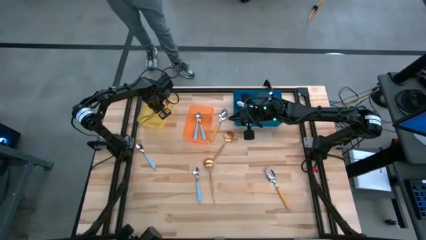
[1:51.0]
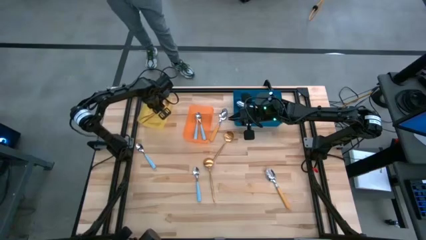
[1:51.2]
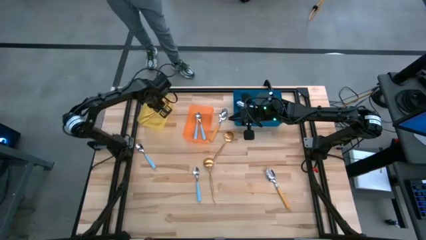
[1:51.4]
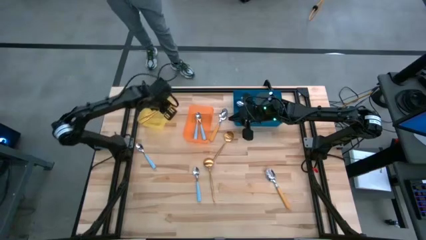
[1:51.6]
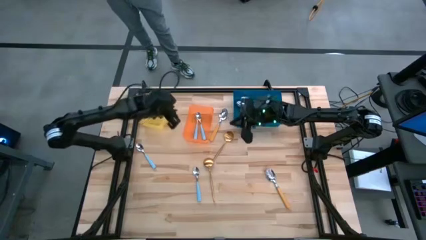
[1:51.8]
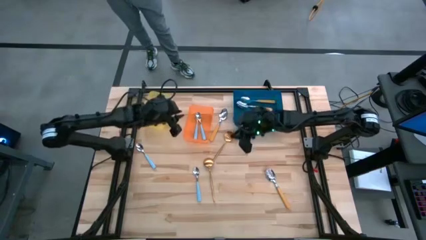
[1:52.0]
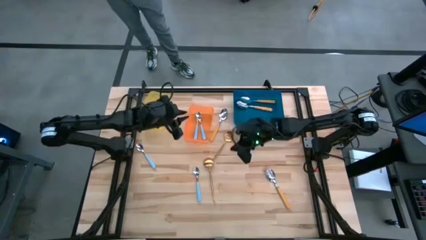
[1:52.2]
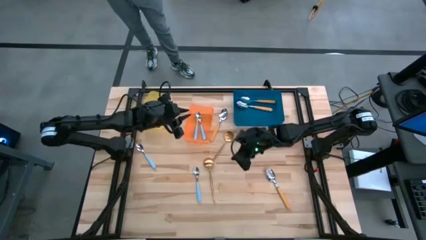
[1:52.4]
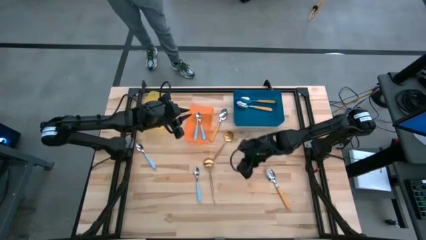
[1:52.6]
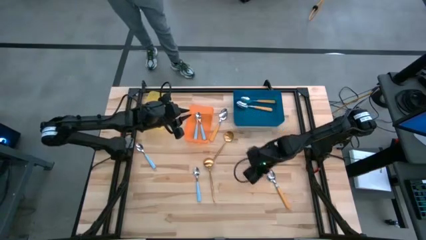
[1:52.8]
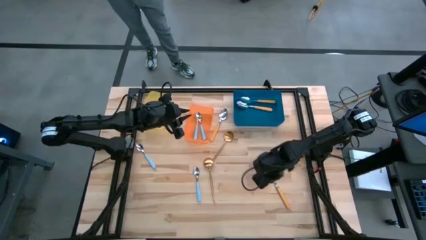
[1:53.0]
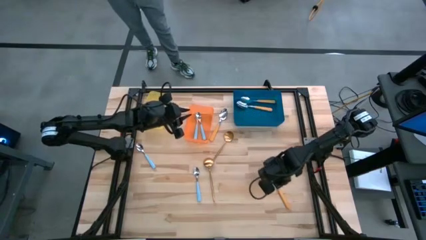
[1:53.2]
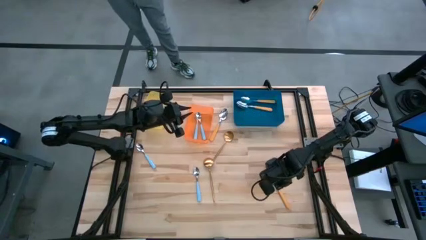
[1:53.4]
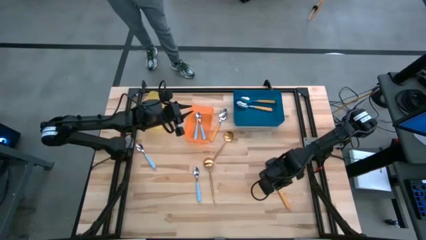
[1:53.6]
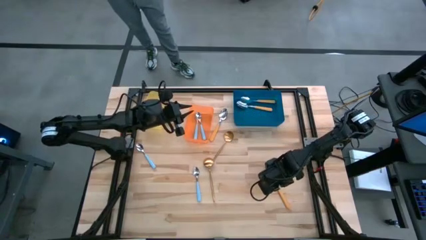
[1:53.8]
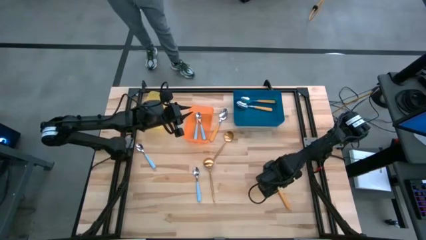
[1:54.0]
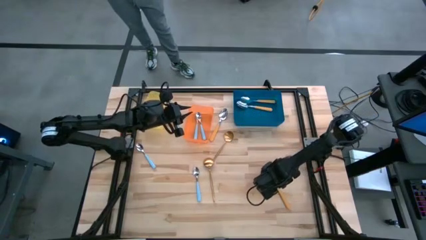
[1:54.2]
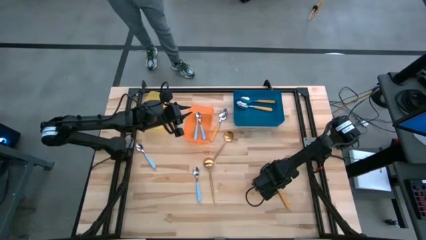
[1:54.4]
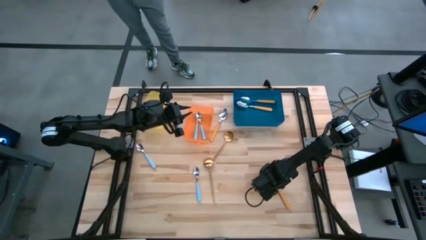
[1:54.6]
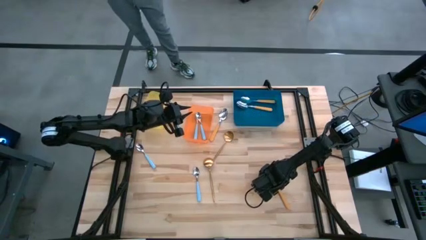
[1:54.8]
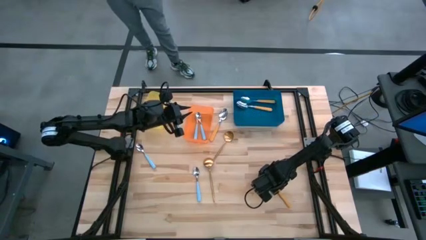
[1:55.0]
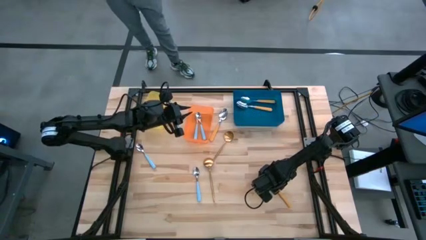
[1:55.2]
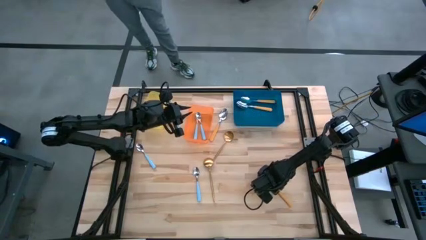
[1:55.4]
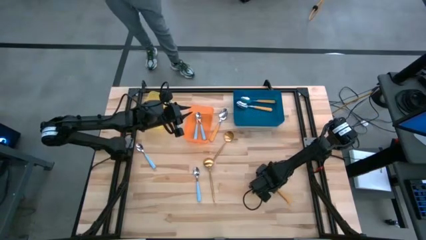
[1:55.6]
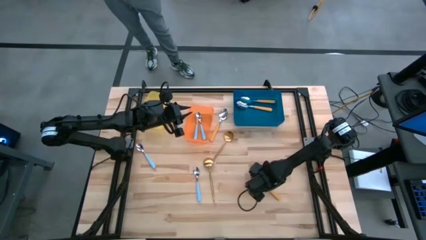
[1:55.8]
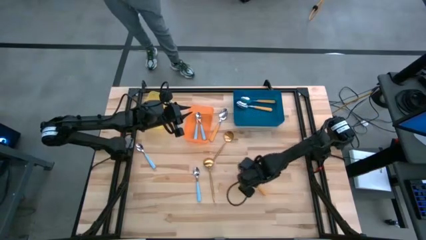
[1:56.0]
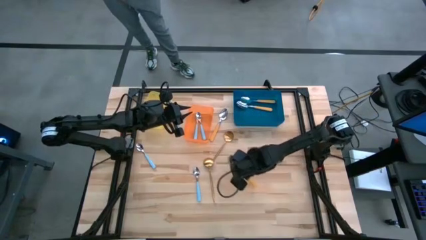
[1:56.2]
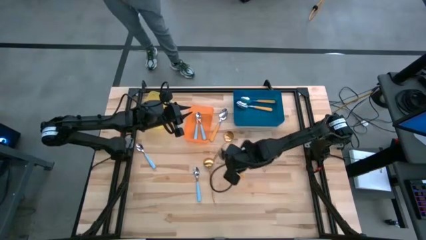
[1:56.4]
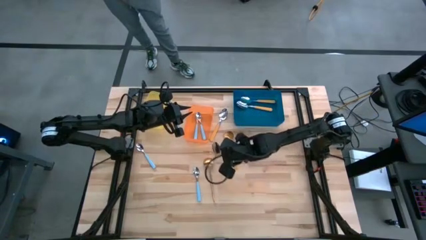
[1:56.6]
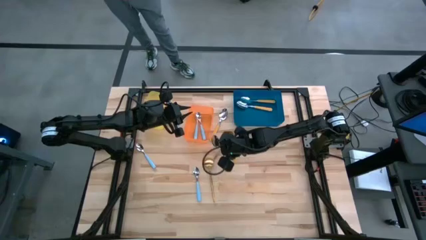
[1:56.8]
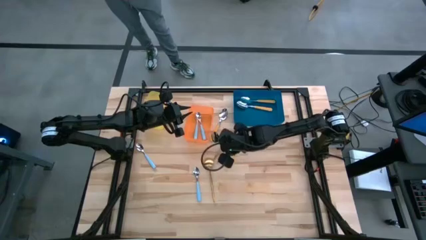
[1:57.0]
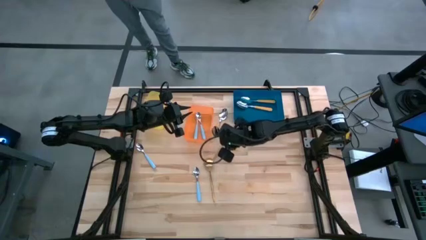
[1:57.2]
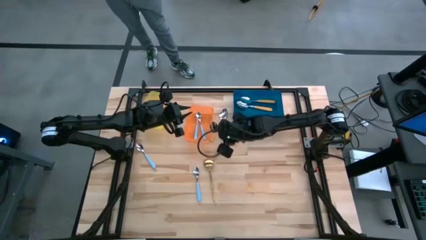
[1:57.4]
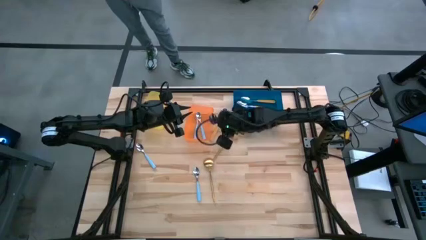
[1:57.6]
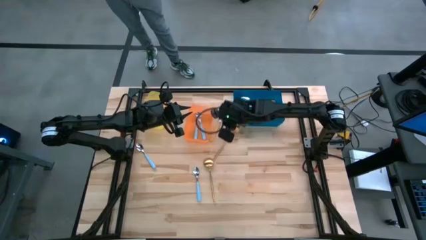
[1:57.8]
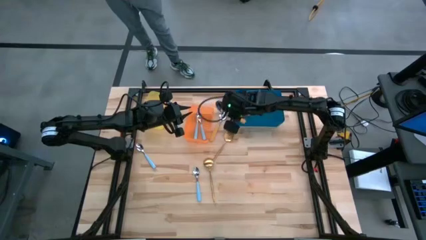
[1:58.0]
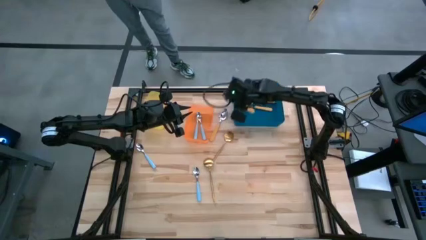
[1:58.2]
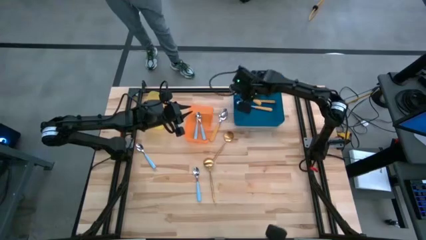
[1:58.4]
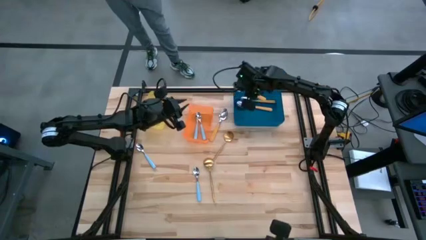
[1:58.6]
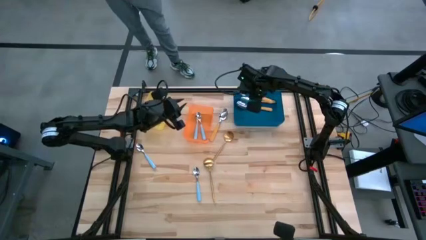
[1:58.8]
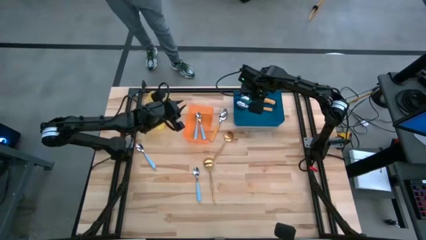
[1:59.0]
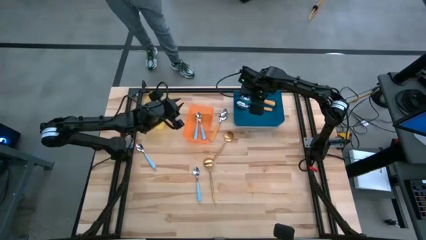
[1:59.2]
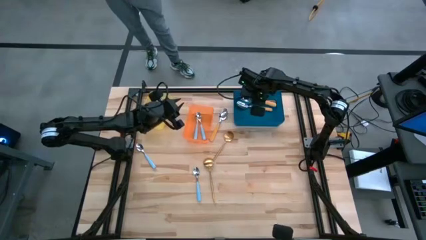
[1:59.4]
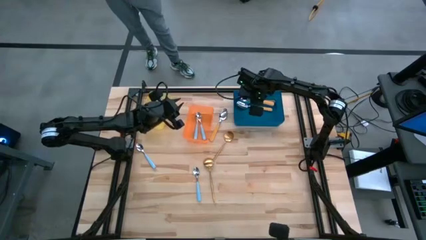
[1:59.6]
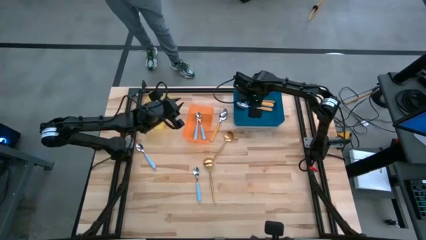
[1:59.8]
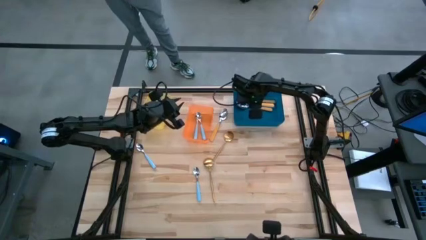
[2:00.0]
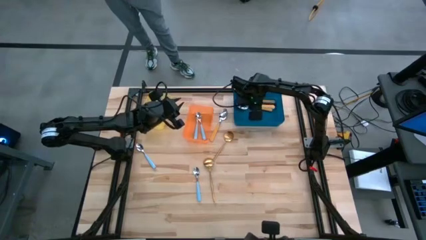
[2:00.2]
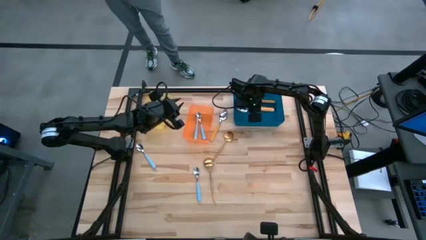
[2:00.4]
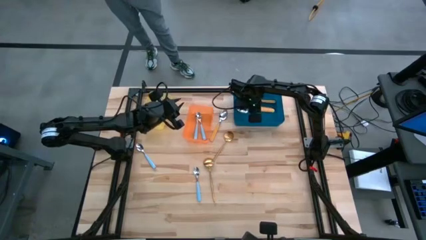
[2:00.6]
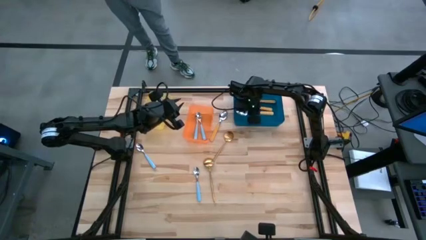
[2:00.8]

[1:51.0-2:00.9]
Task: Sort silverware by color (type)
Put the yellow spoon into the blue bin

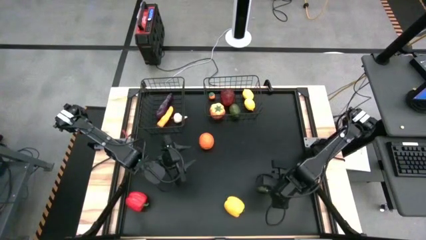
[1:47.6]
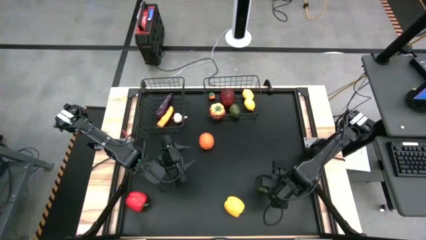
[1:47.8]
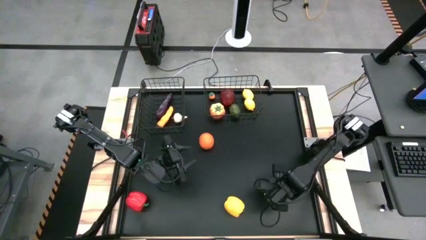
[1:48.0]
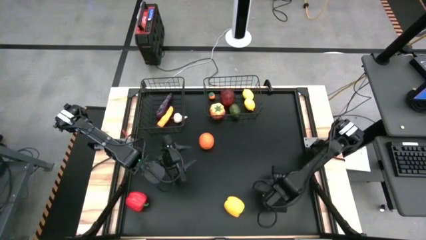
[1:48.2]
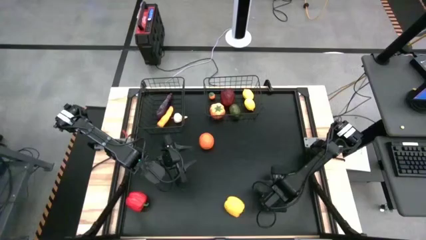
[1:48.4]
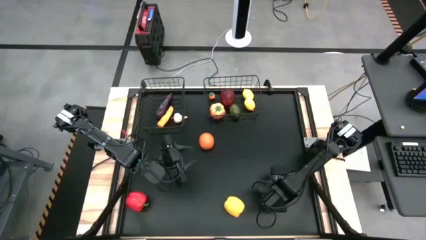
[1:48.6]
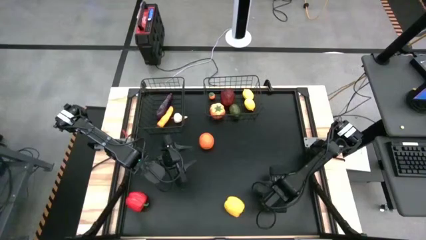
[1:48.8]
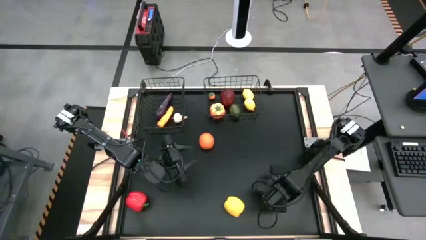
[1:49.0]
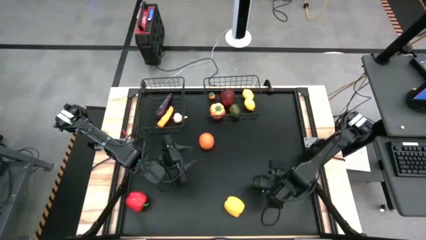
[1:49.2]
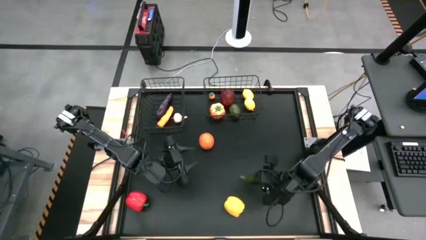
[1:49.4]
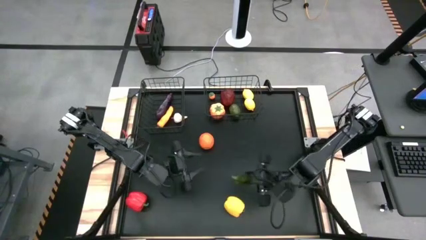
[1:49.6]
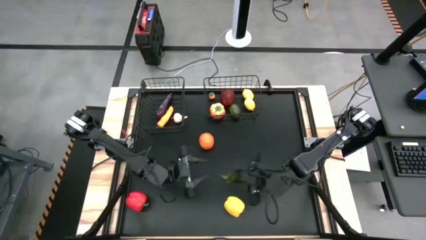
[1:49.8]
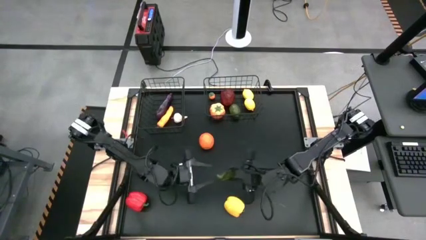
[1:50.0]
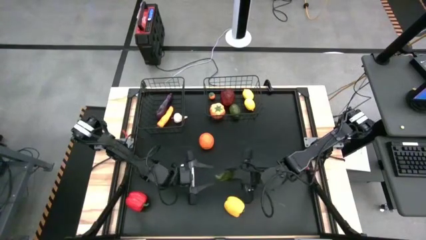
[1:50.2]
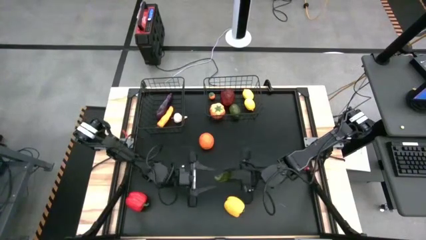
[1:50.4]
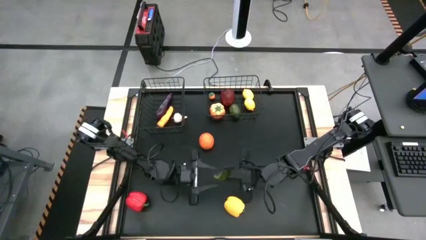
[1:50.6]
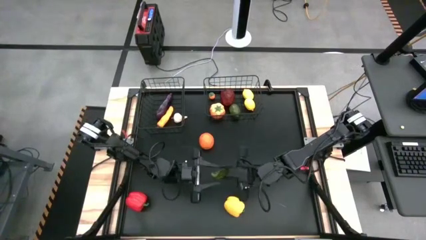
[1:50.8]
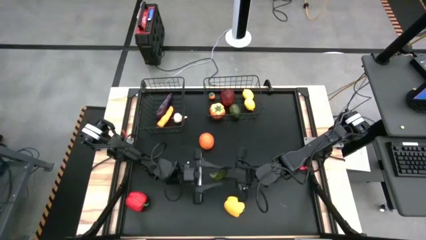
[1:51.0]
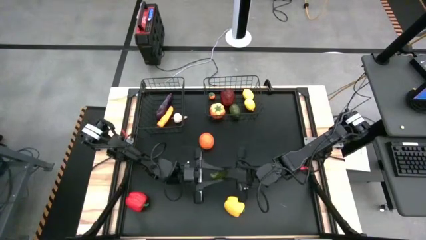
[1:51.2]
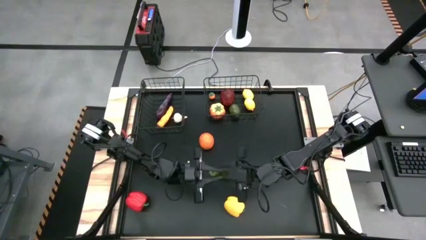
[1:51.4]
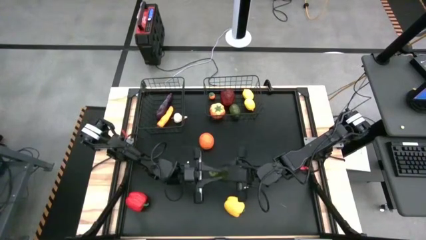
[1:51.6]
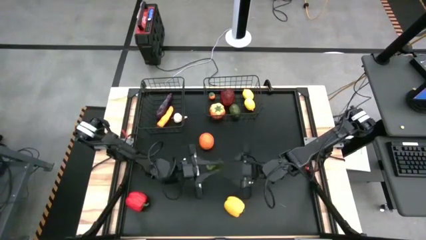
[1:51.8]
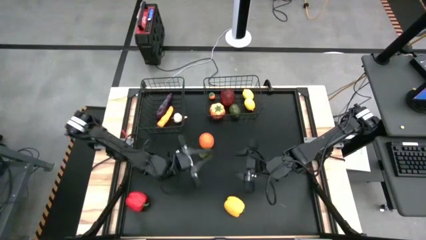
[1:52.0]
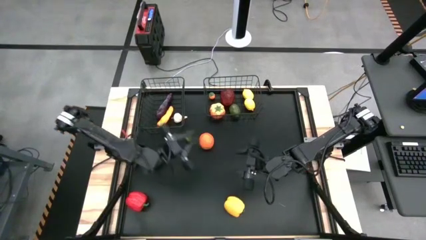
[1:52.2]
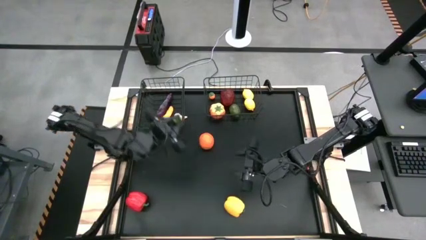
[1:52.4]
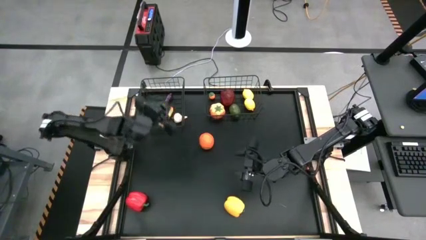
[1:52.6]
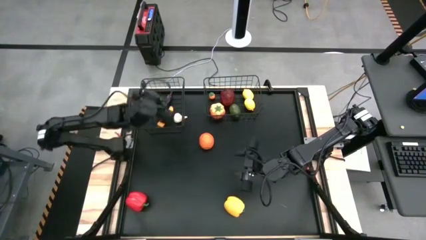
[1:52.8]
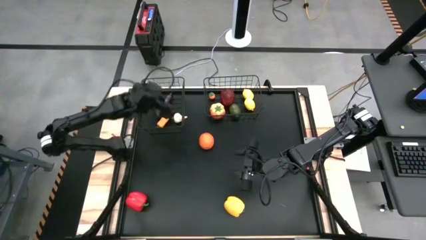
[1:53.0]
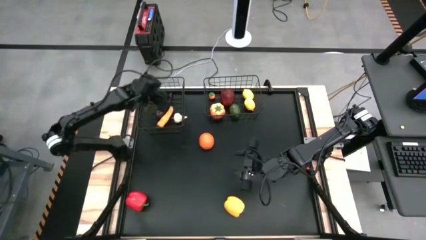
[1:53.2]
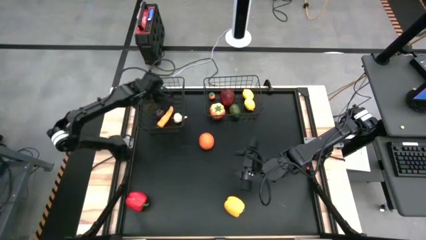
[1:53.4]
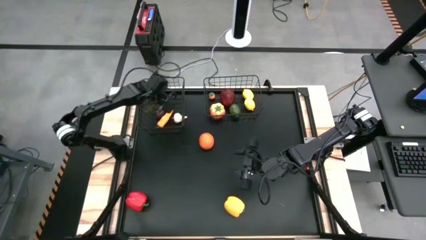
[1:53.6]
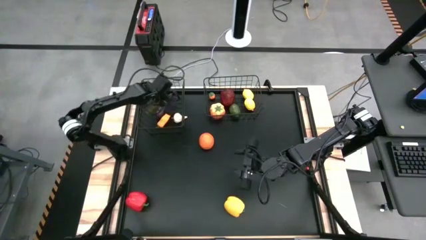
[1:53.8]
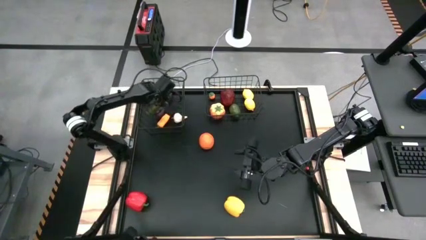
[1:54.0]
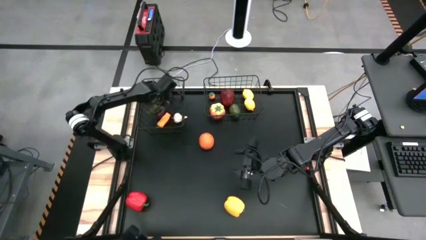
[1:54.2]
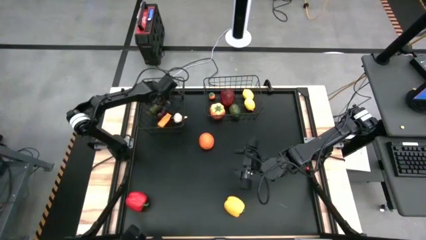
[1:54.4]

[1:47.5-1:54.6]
Task: Sort produce into baskets
Put the green chili pepper into the left black wire basket
